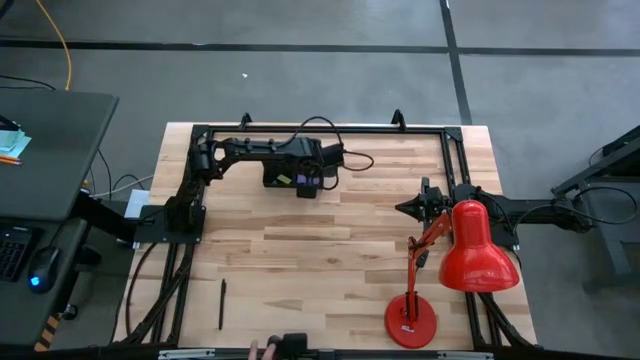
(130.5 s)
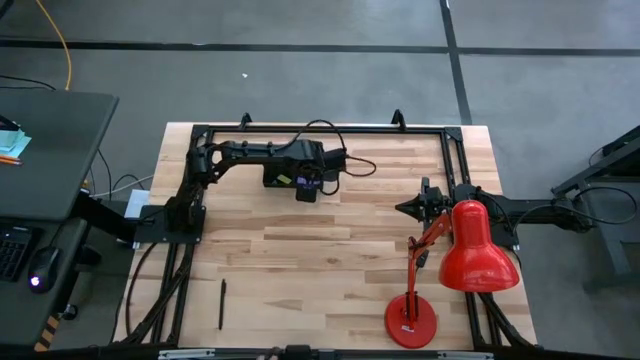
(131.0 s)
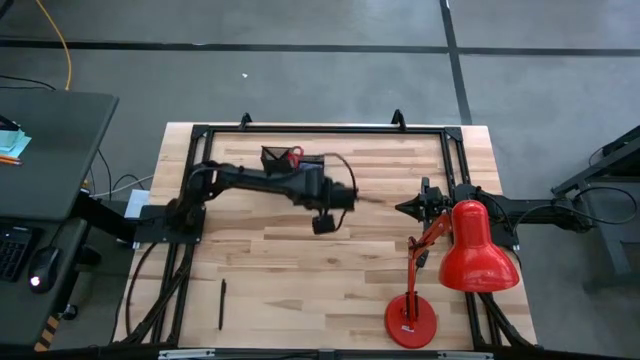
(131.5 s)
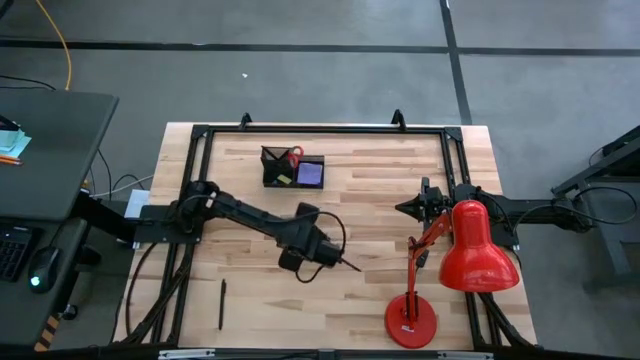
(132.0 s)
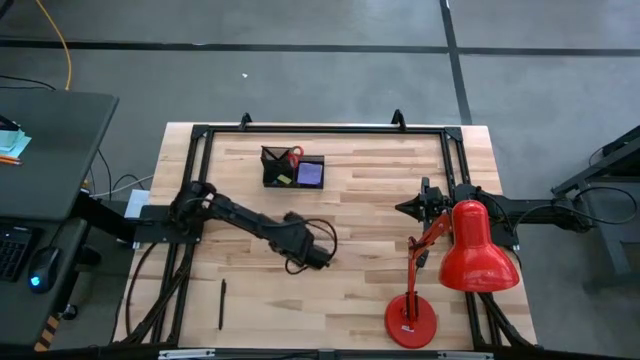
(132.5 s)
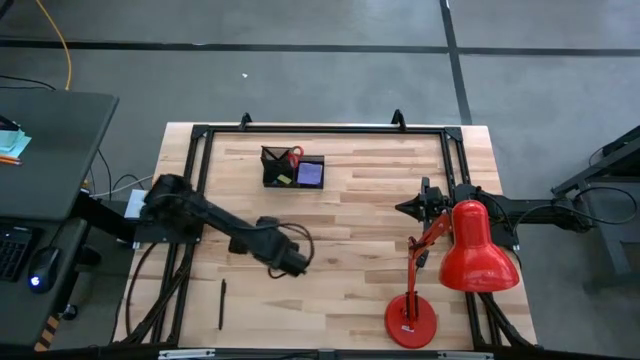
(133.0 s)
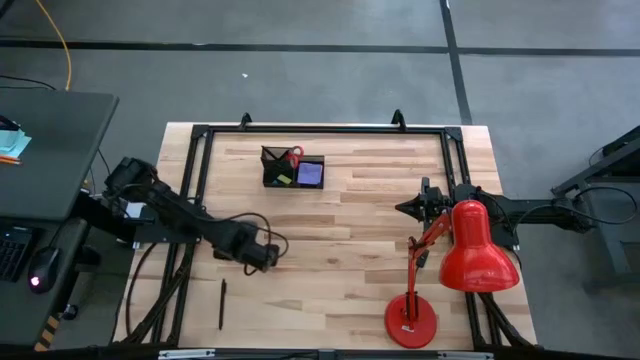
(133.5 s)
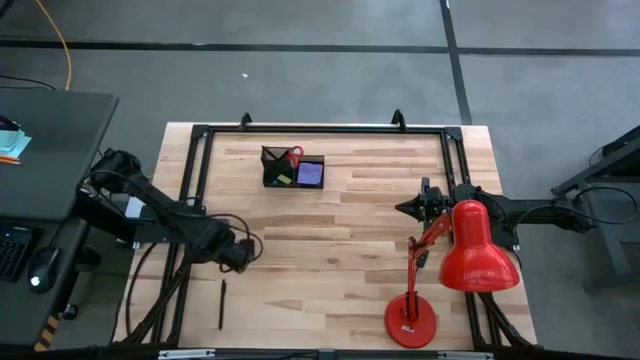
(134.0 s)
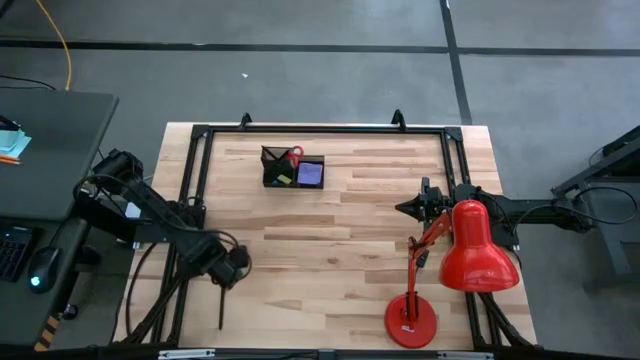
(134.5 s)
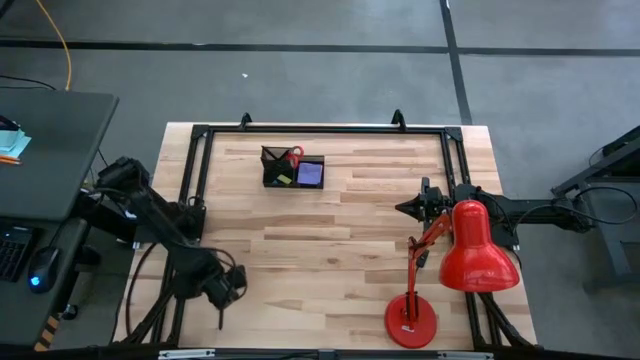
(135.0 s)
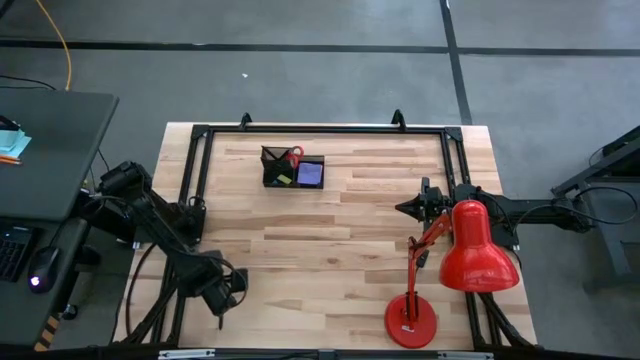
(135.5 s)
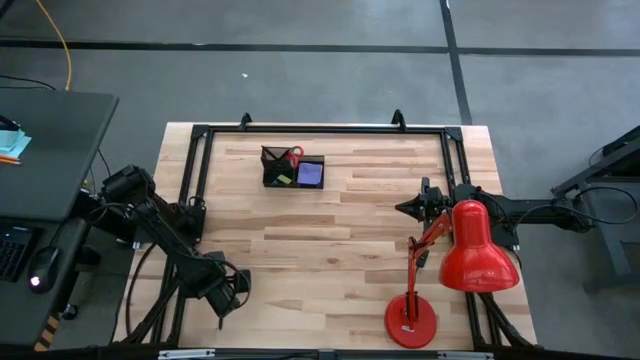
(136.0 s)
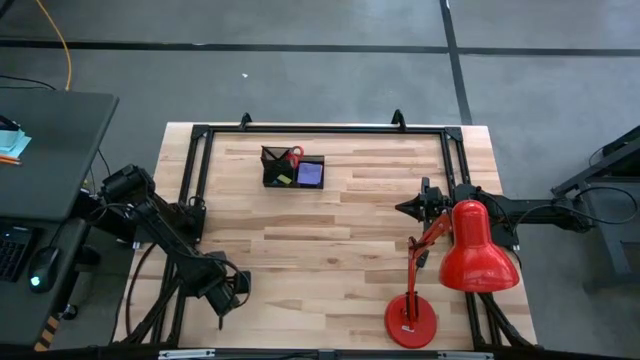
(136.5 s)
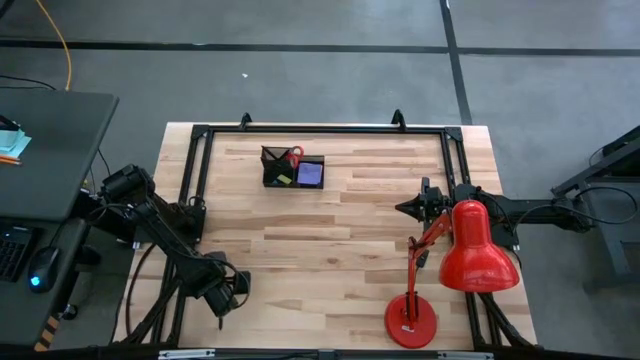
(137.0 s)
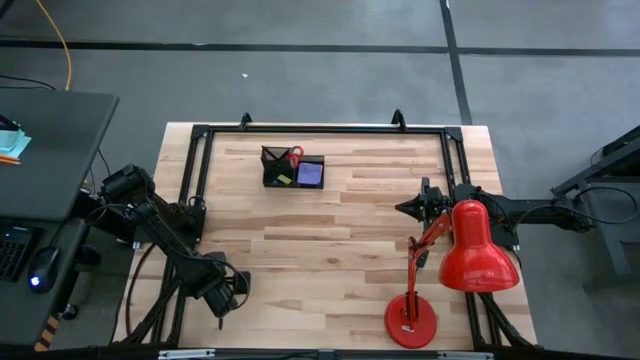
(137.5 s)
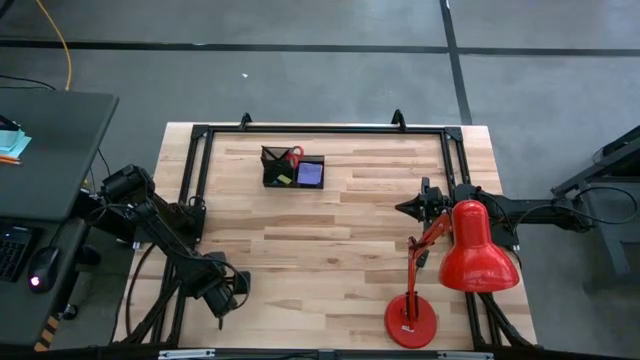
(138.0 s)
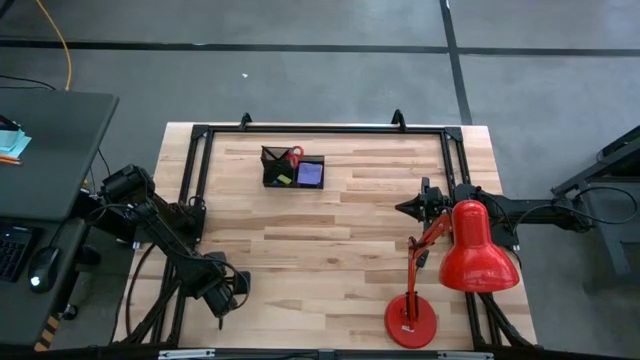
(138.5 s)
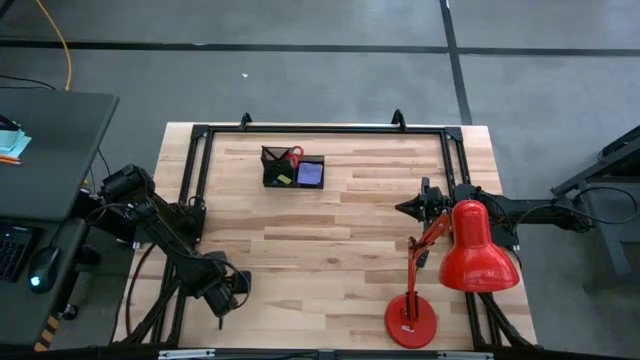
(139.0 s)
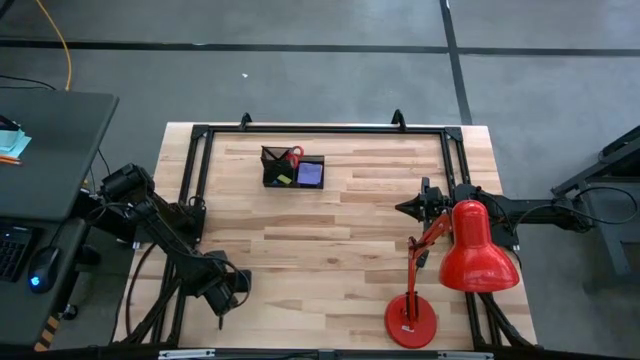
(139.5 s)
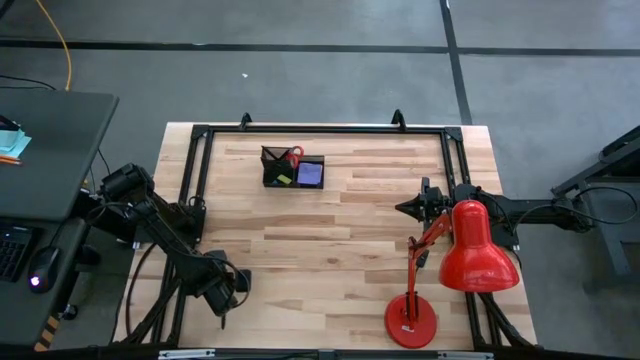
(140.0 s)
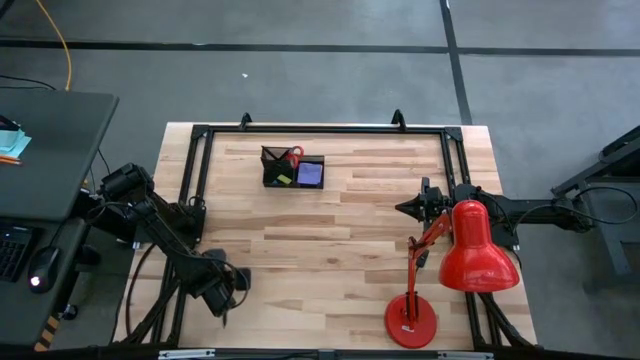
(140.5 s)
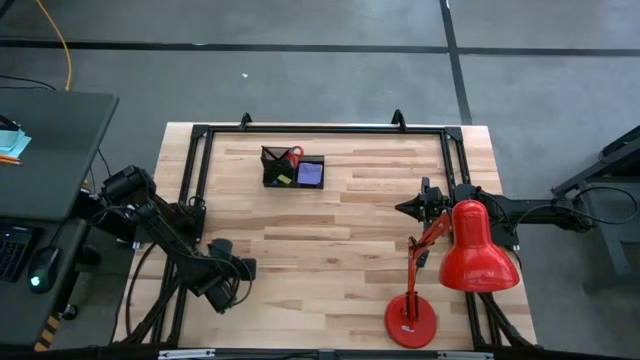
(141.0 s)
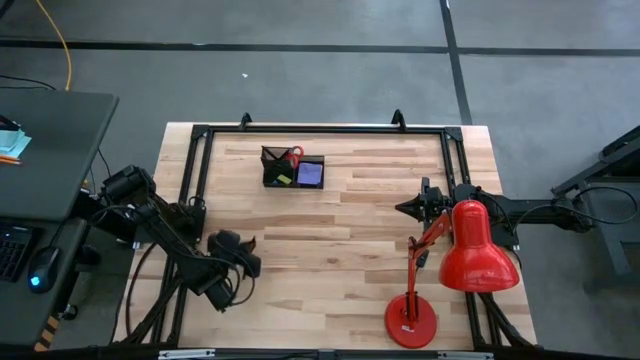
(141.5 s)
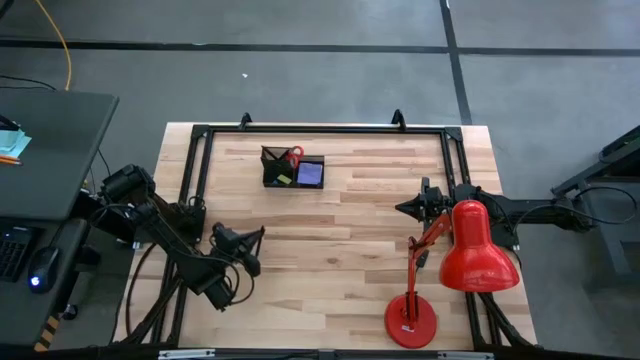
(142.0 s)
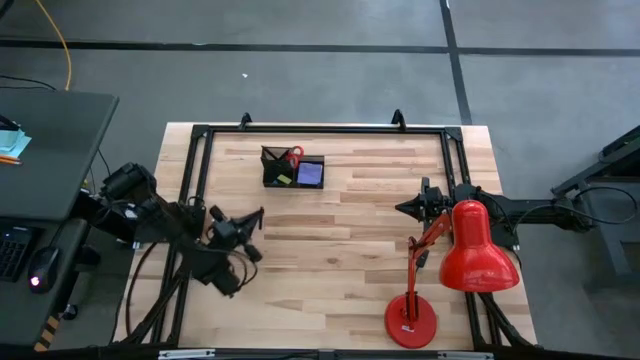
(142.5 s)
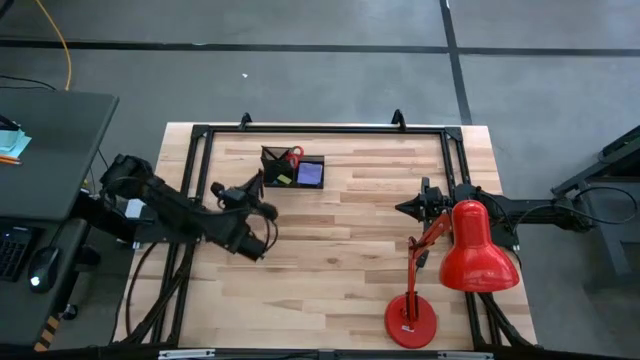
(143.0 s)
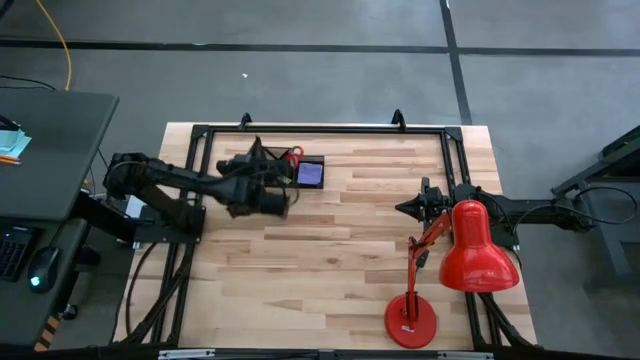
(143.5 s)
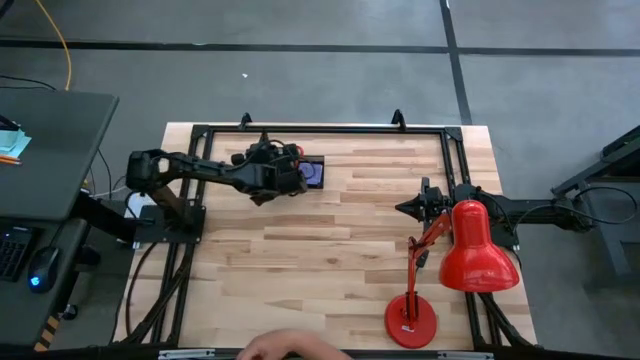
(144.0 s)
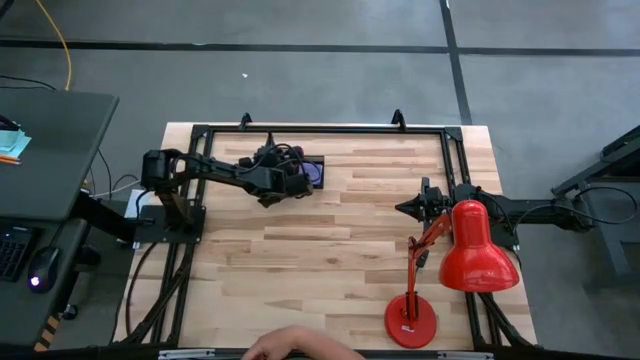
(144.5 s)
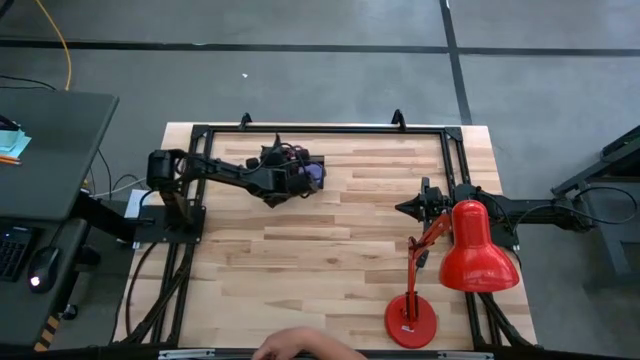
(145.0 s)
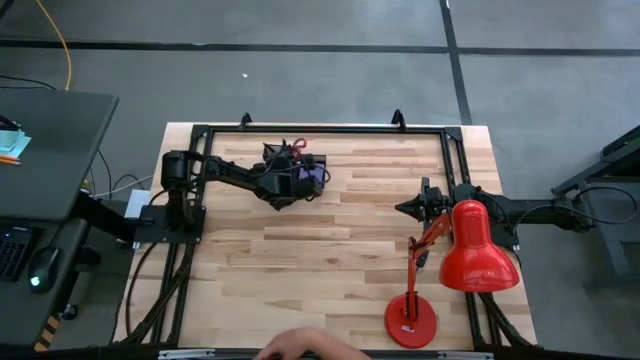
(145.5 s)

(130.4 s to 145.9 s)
Task: Pick and place office supplies into organizer
Put the black pen into the black desk organizer

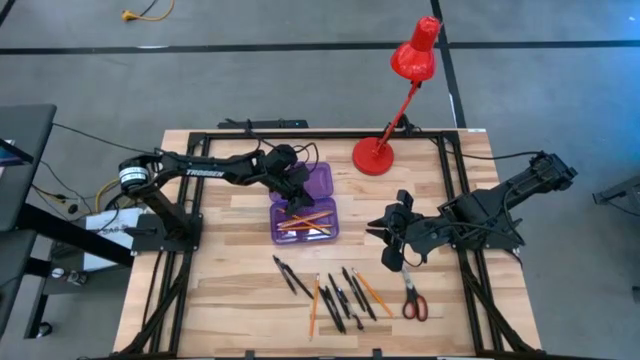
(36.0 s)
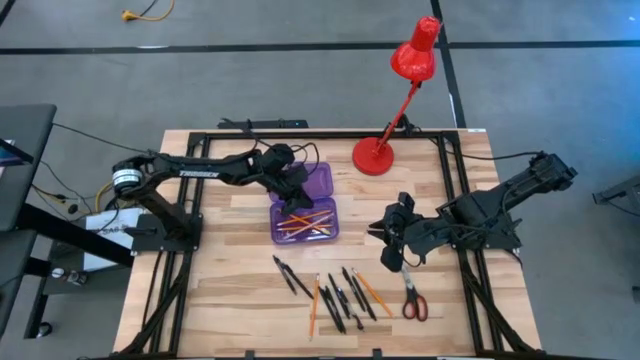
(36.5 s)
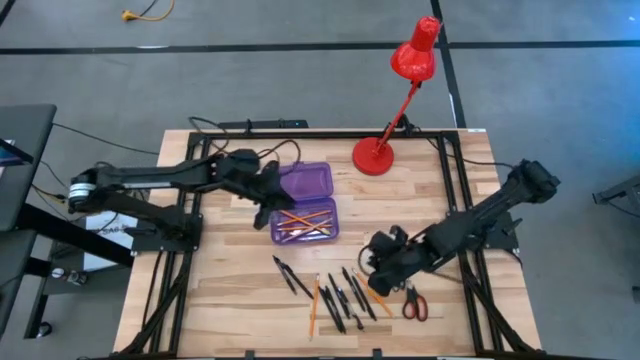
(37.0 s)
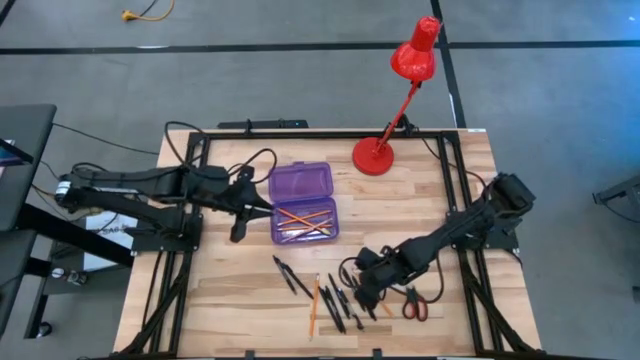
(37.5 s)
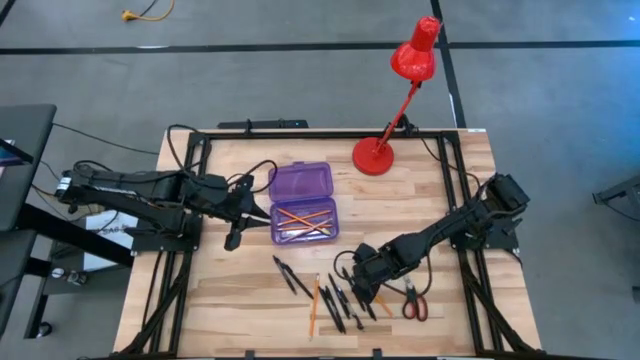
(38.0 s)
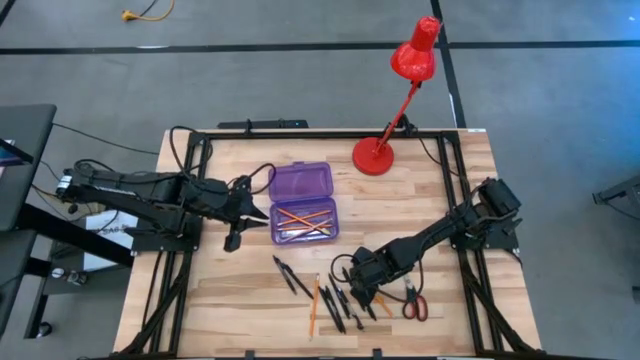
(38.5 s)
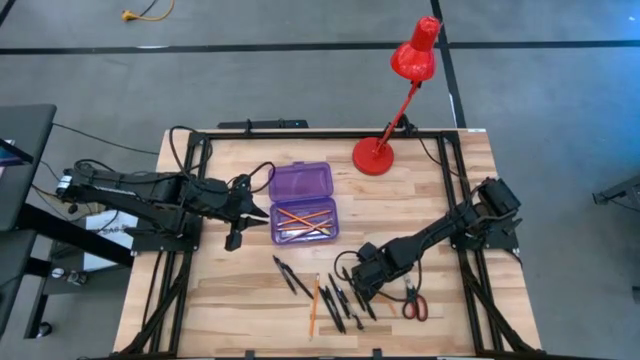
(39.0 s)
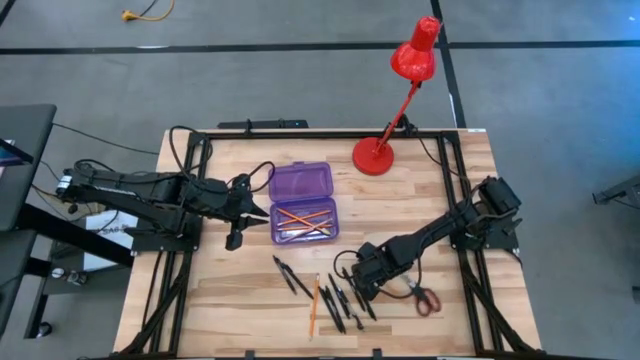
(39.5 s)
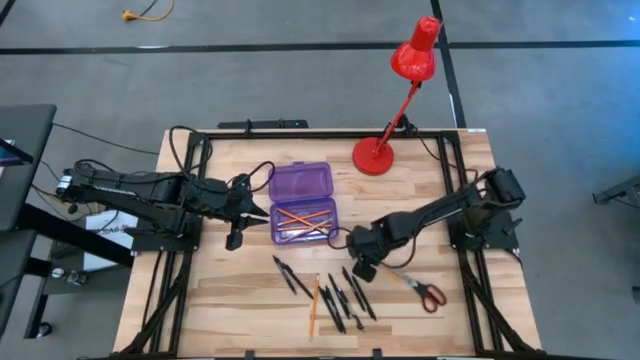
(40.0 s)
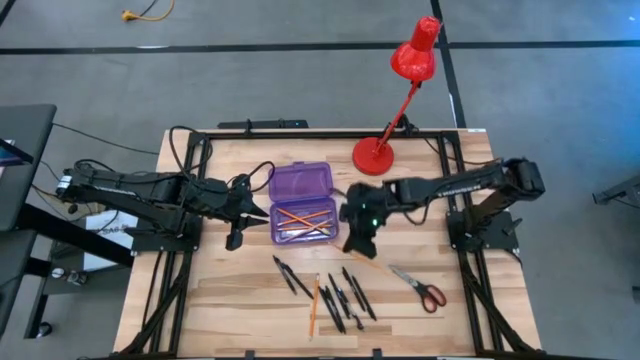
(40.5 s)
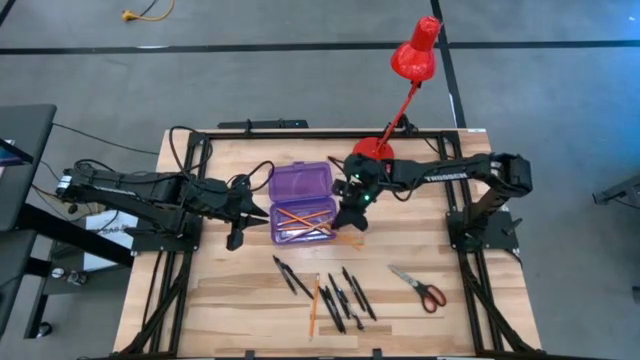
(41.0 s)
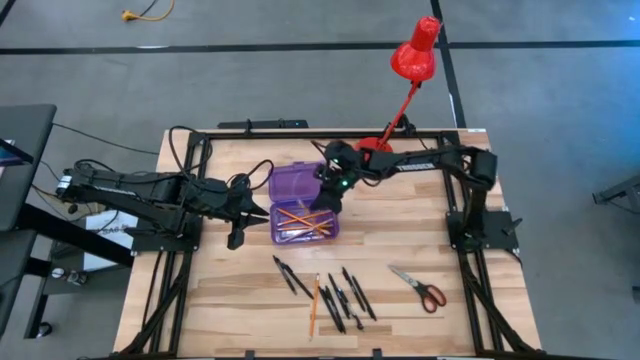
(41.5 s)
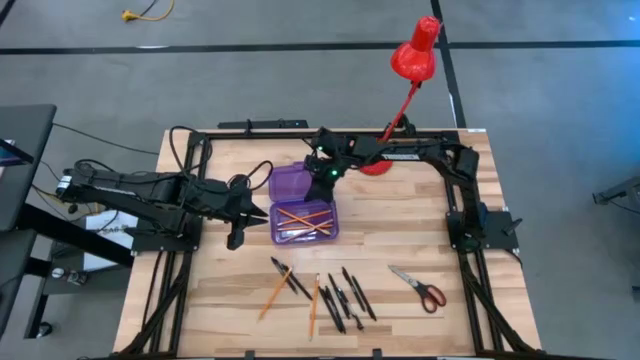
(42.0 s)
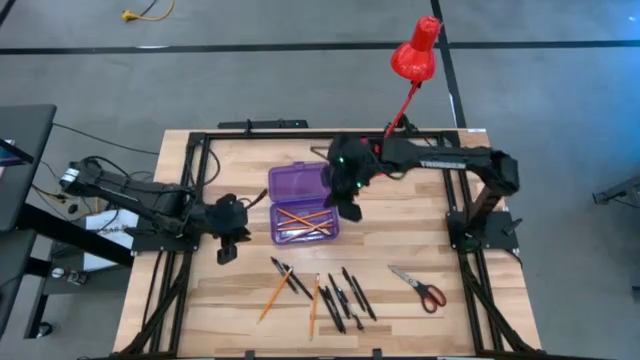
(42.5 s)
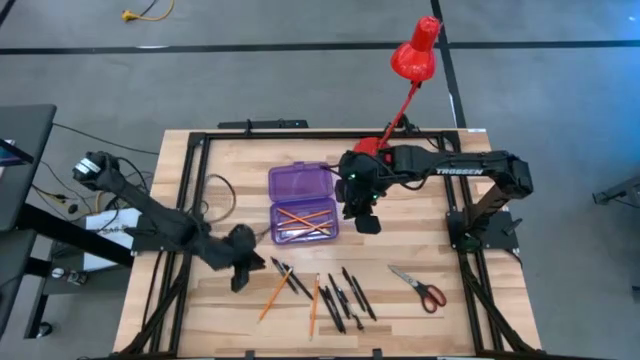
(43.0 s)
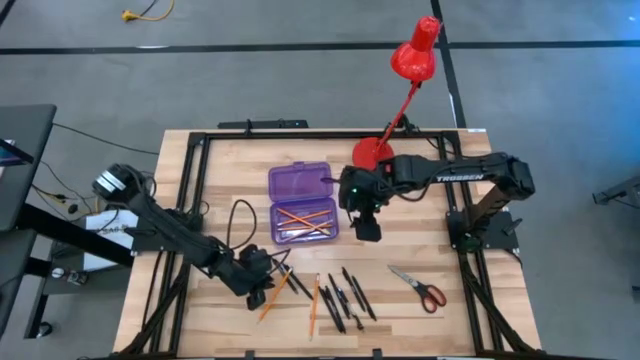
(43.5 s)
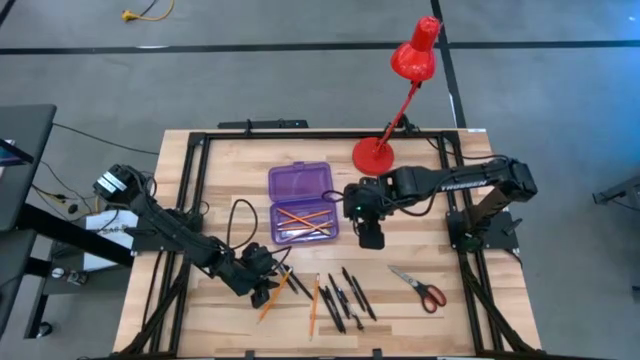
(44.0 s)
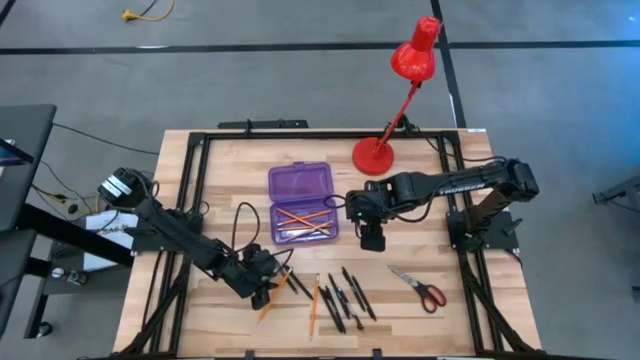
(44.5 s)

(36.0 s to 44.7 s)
Task: Pick & place school supplies into a supply box
Put the orange pencil into the purple supply box
